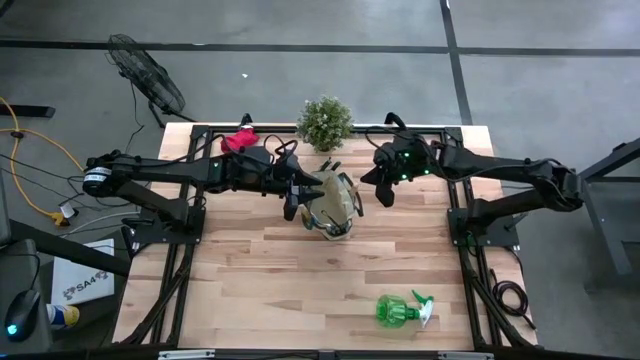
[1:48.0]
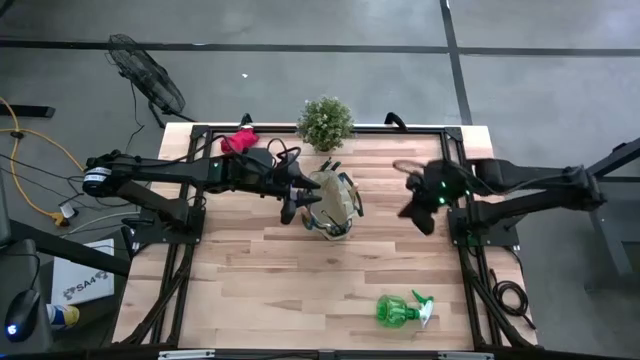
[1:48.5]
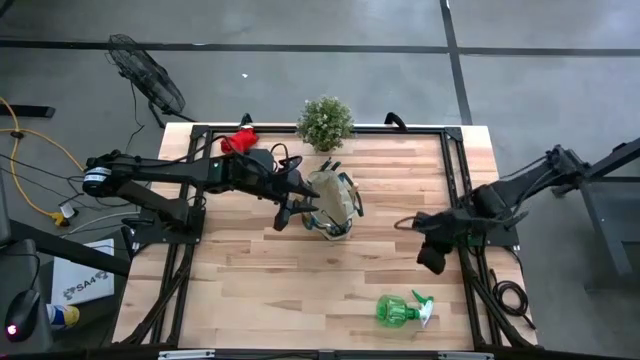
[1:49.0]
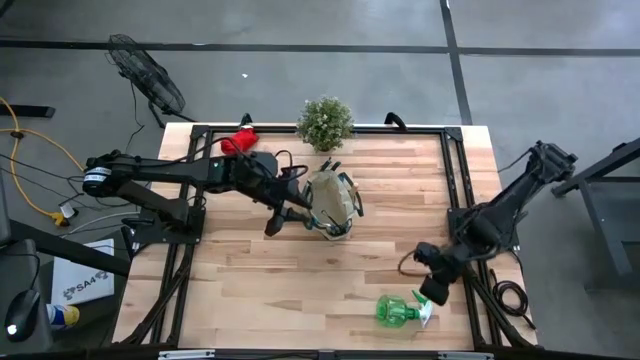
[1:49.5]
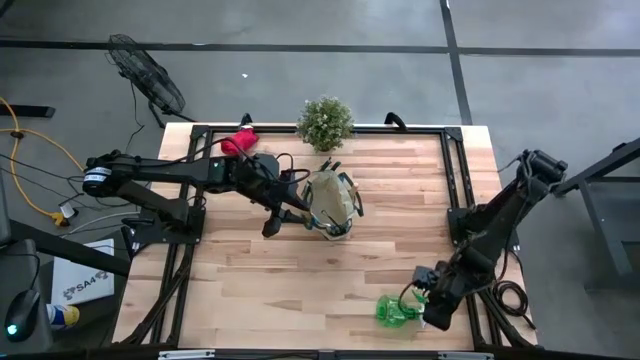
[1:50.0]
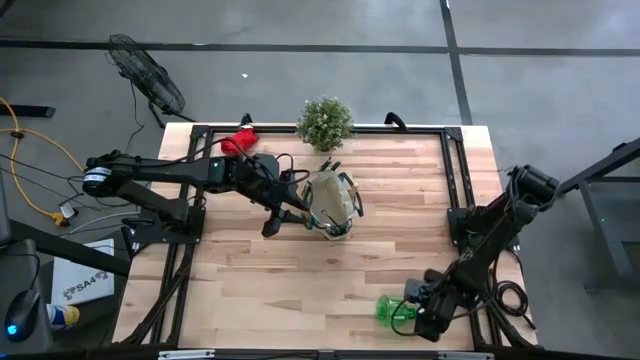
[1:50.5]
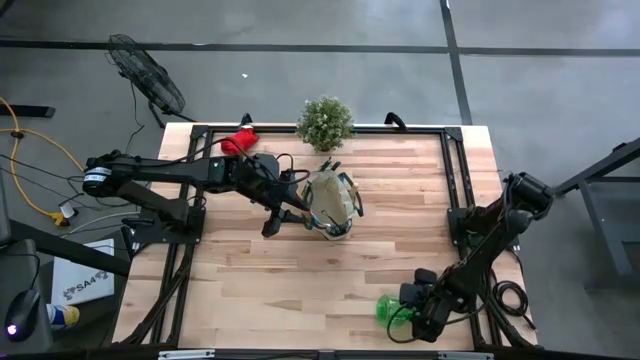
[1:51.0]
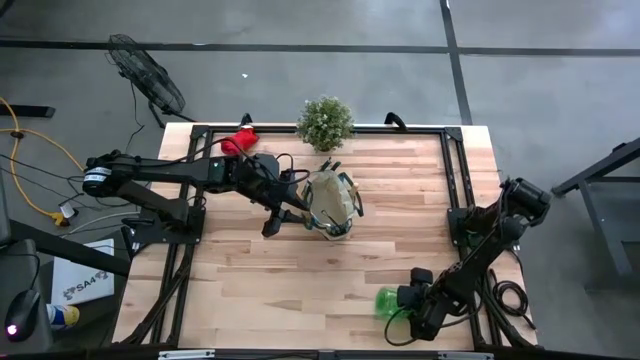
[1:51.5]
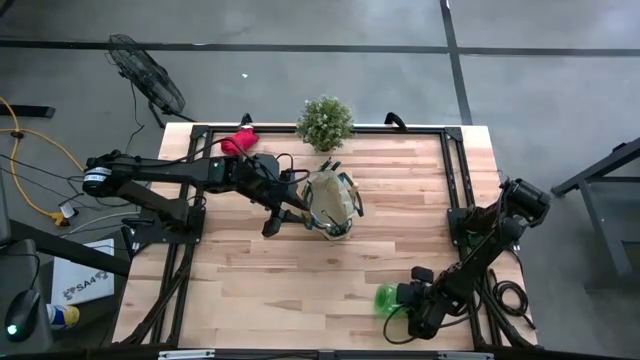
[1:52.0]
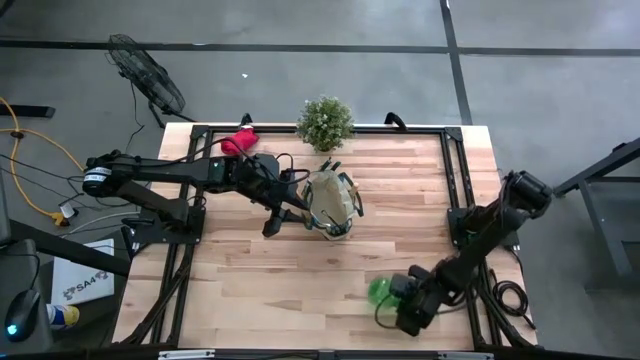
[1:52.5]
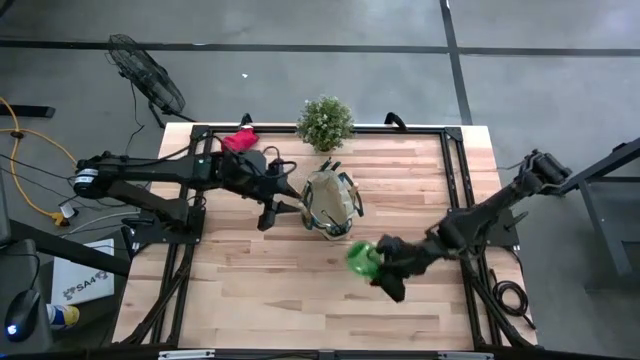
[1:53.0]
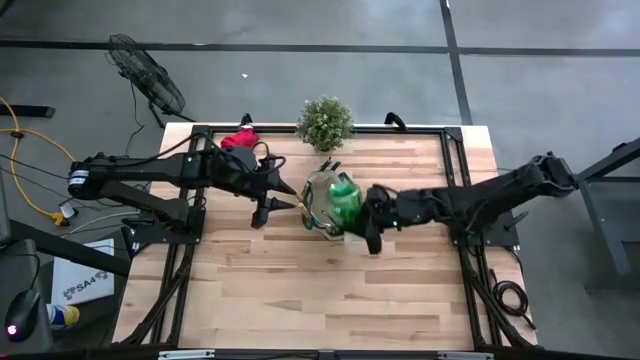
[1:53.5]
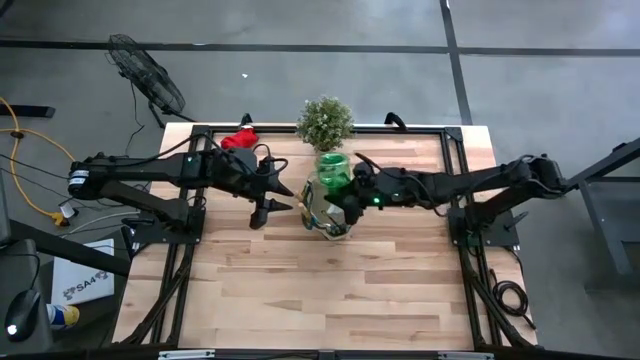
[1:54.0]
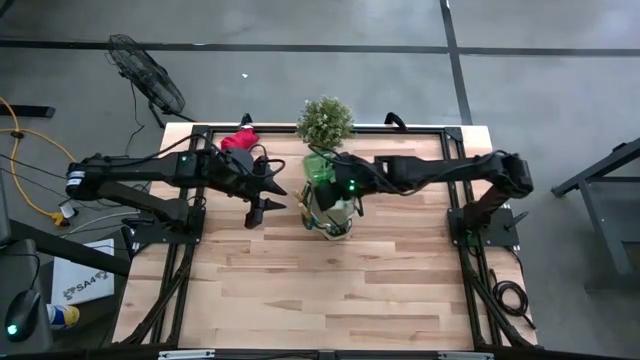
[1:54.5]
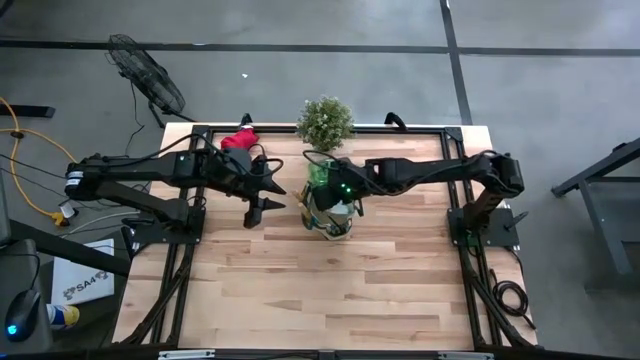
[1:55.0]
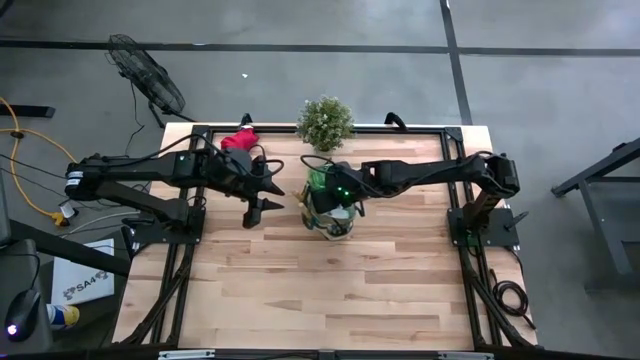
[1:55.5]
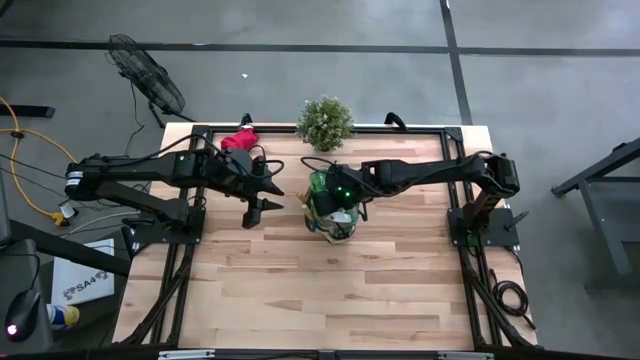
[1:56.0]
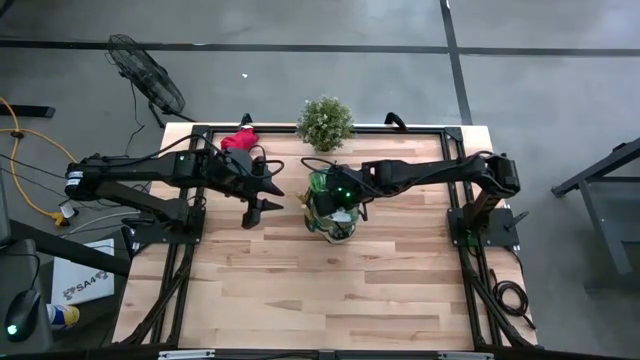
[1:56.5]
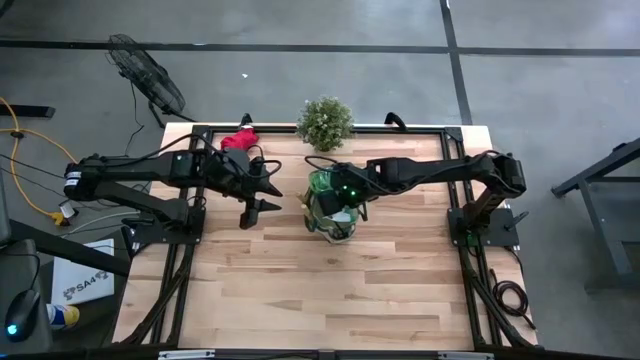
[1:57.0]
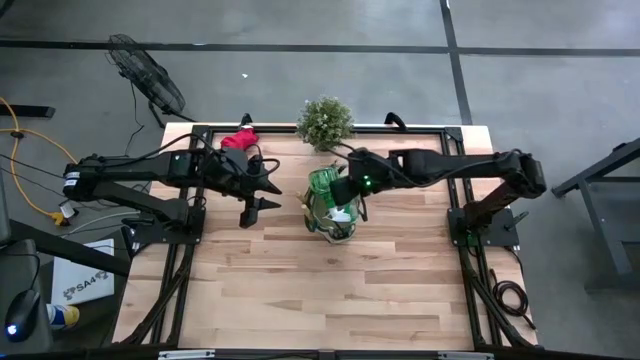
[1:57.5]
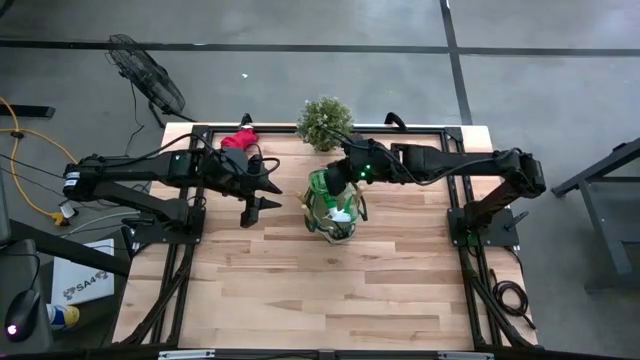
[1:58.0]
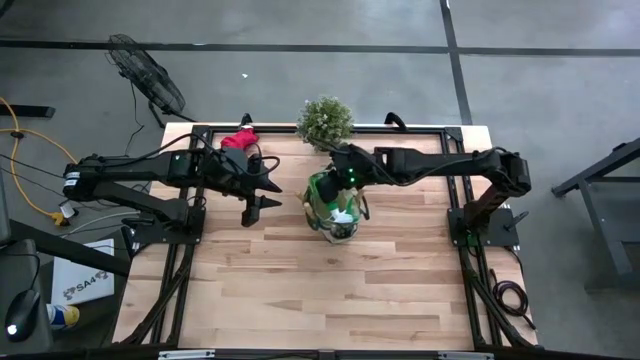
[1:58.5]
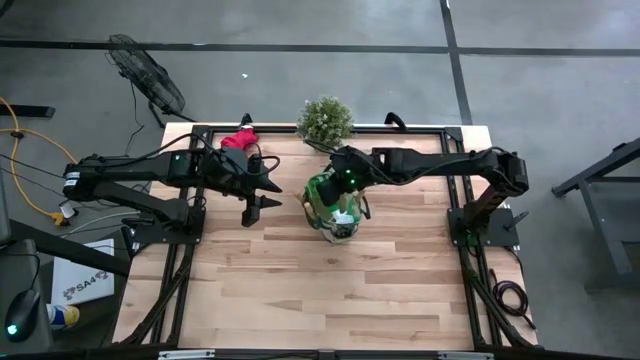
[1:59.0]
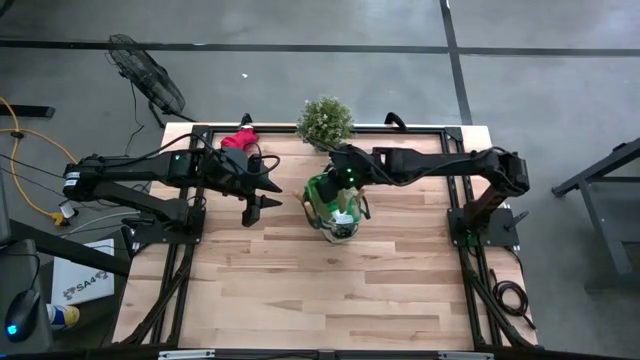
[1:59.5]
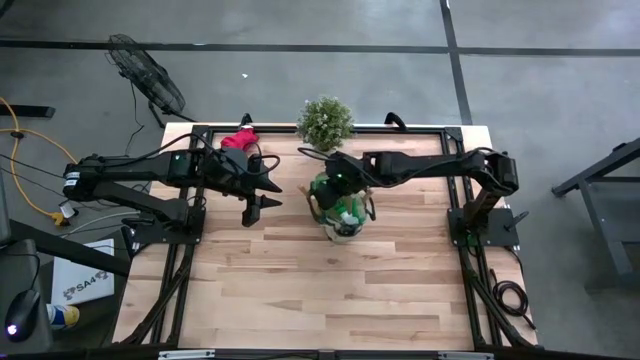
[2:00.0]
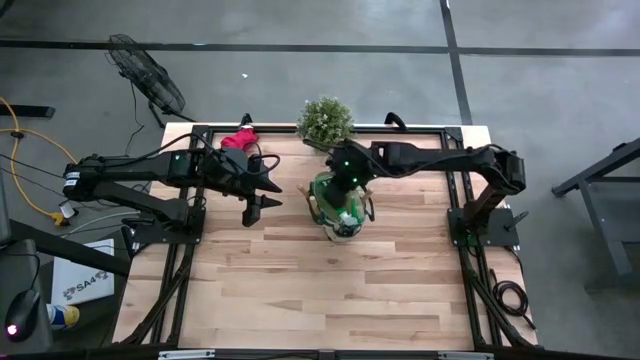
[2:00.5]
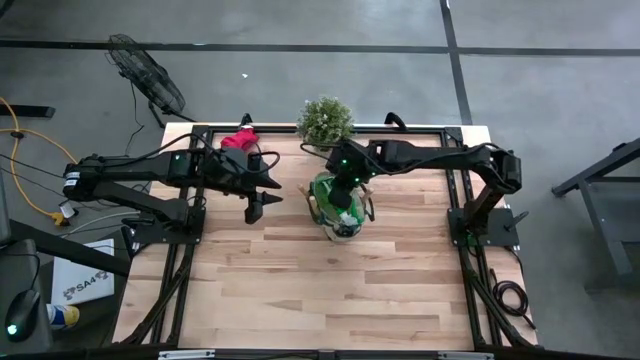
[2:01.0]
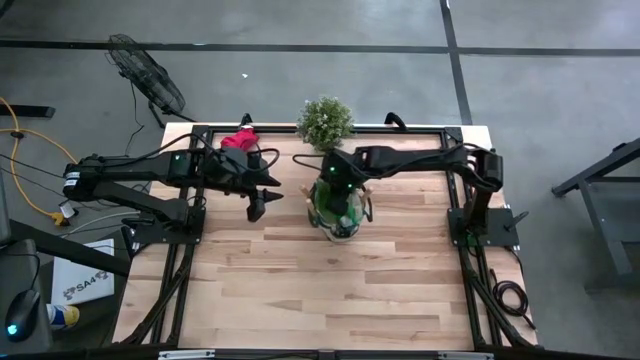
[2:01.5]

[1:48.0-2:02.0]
Task: Pick & Place Garden tools in Gardening bag
Put the green spray bottle into the brown gardening bag

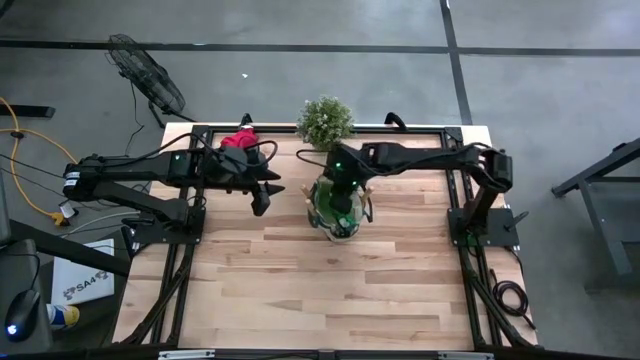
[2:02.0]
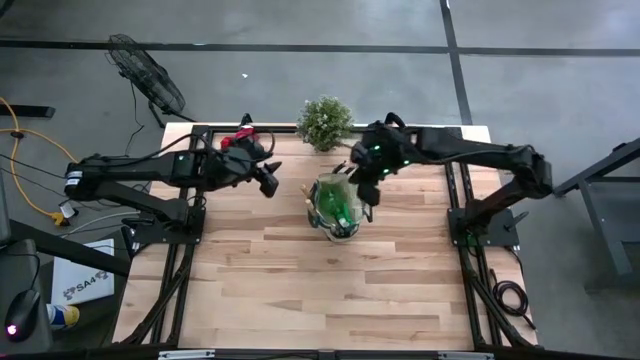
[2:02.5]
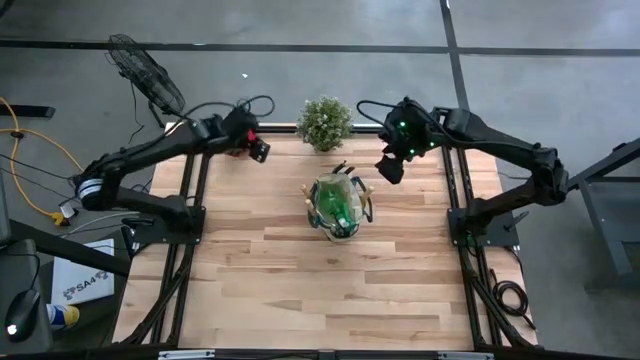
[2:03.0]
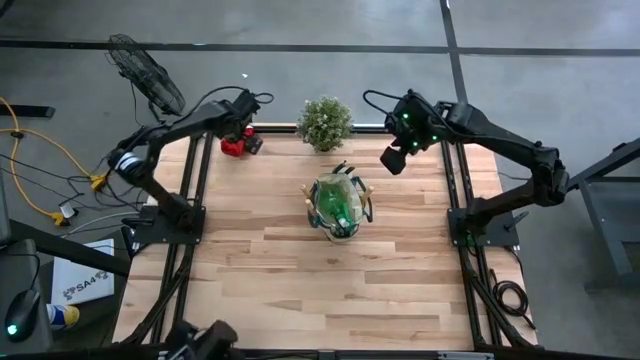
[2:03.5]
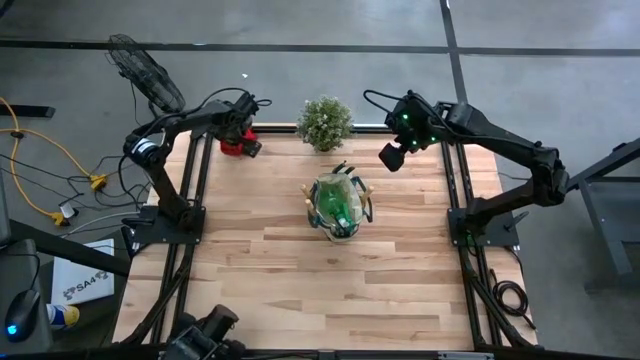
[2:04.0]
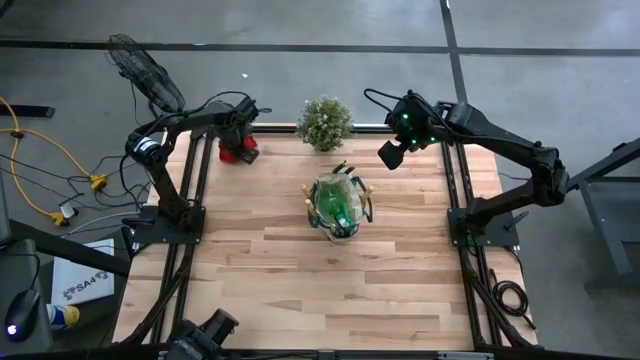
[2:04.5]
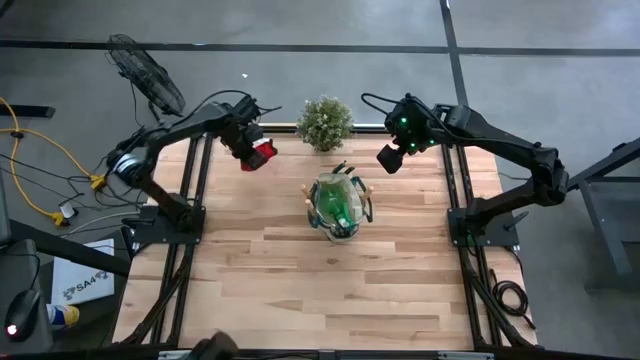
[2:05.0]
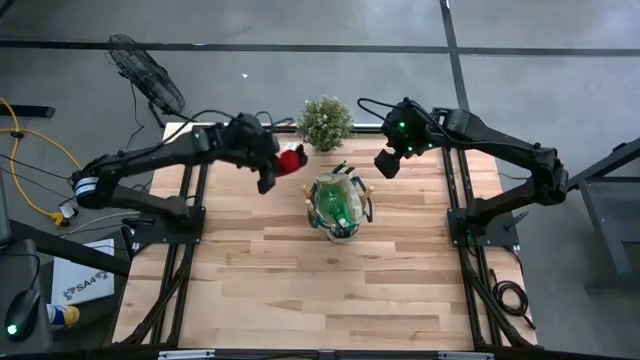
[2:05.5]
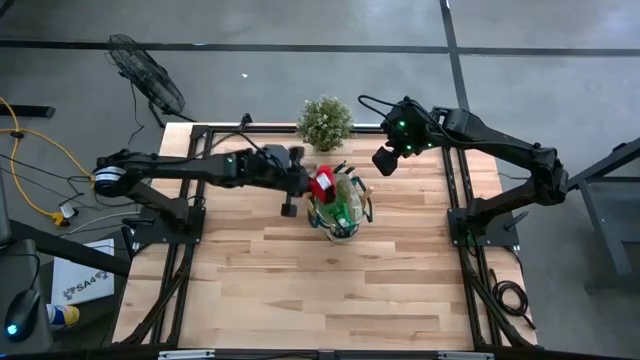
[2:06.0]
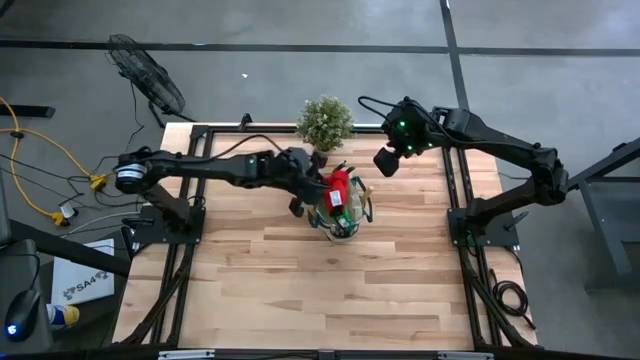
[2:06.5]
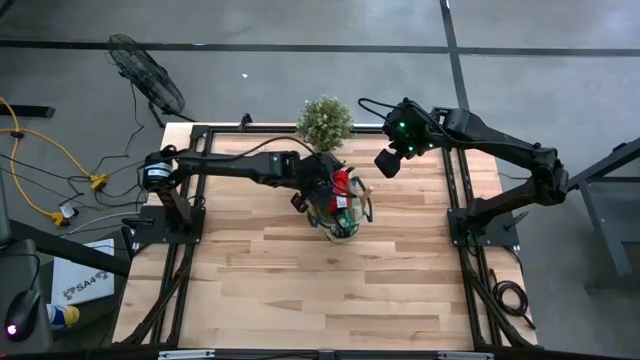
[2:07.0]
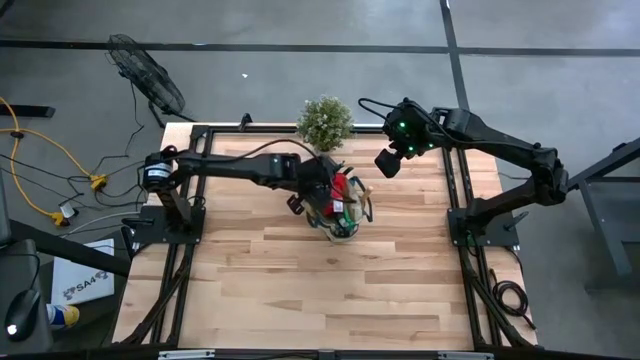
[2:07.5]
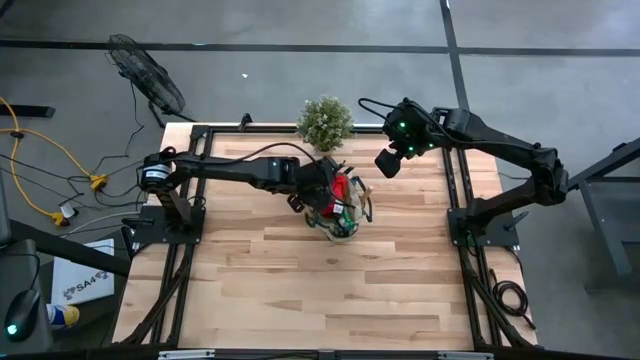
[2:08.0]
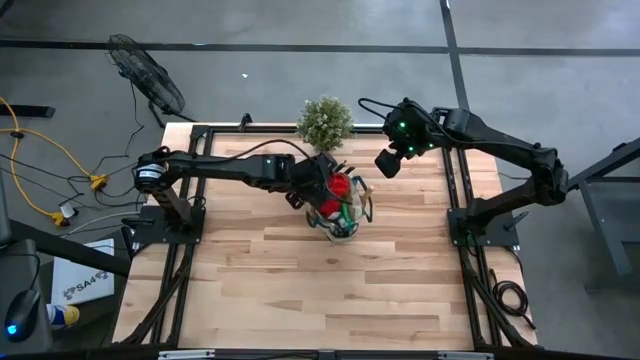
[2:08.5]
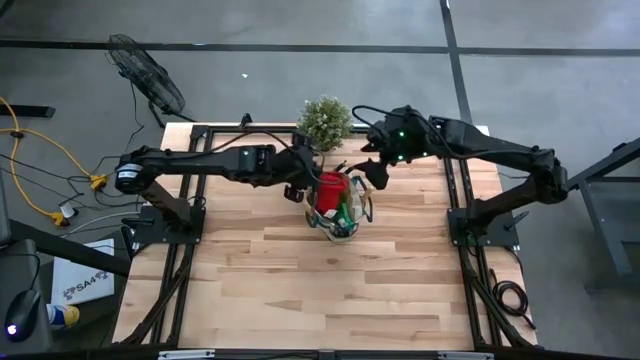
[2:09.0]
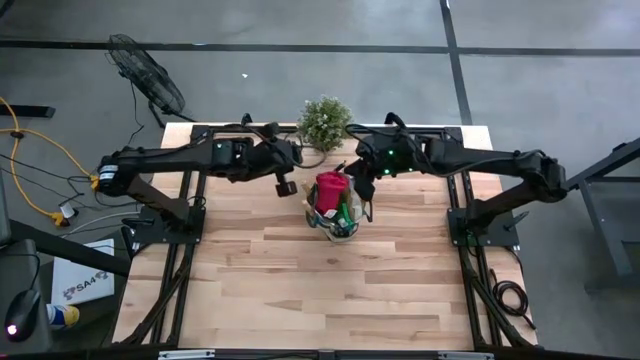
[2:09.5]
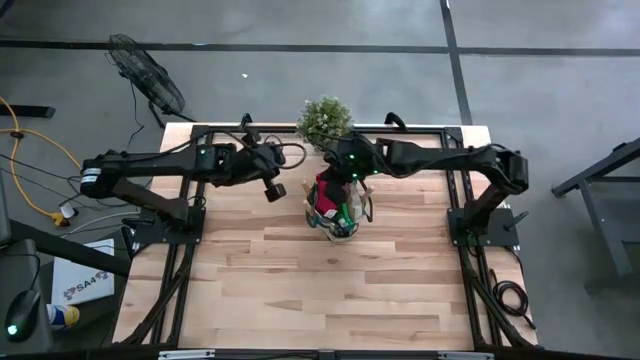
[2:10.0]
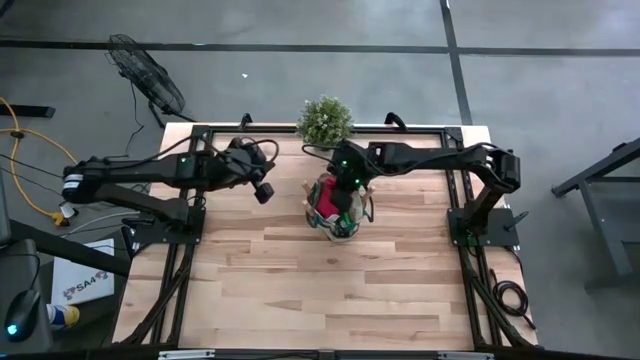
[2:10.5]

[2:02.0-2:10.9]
Put the red gloves into the brown gardening bag
